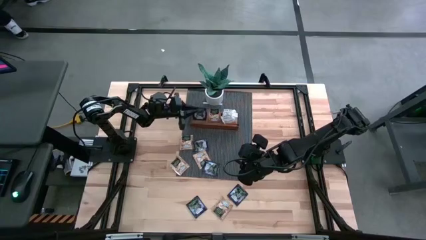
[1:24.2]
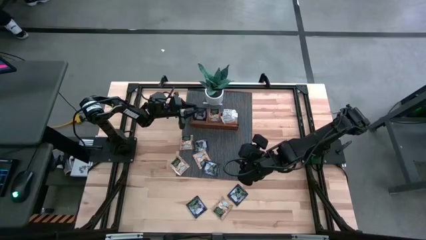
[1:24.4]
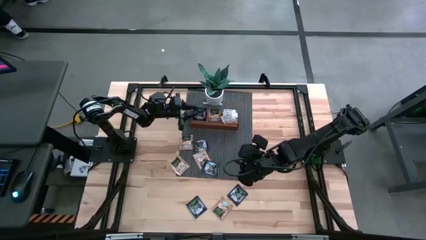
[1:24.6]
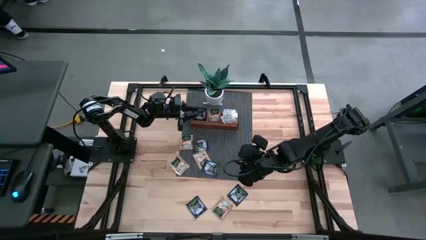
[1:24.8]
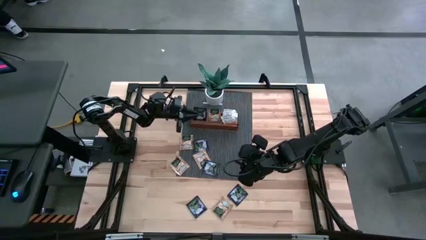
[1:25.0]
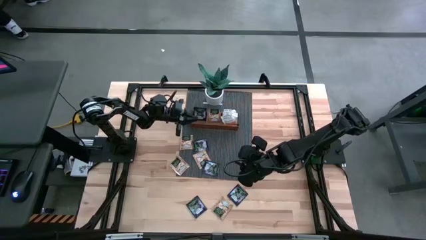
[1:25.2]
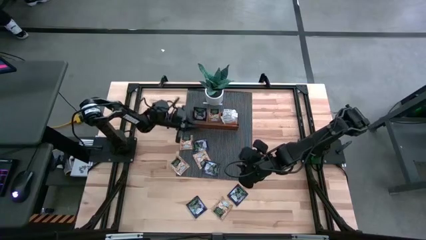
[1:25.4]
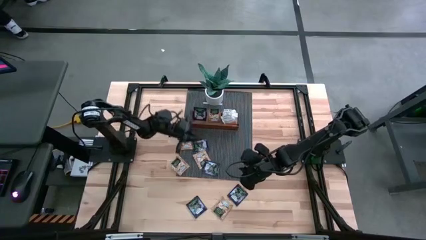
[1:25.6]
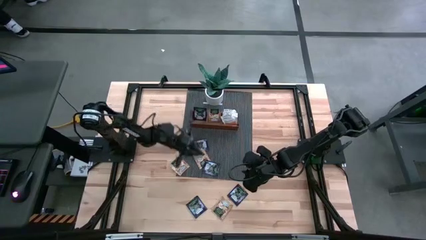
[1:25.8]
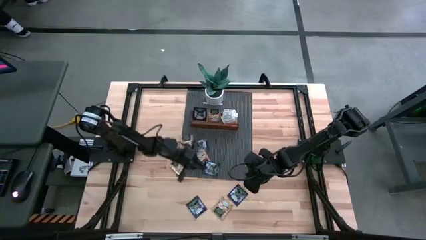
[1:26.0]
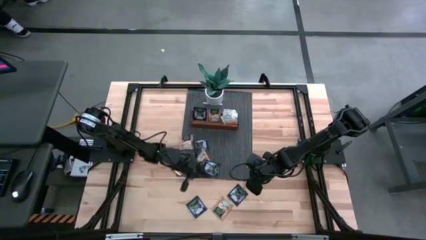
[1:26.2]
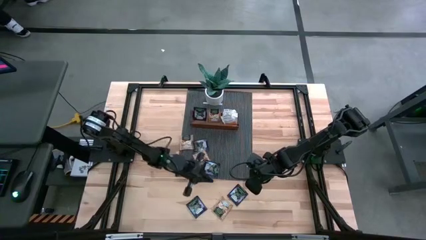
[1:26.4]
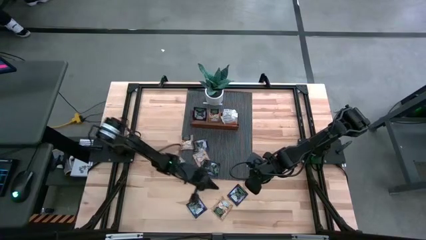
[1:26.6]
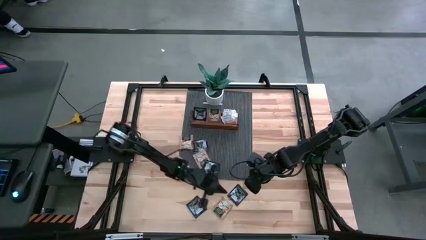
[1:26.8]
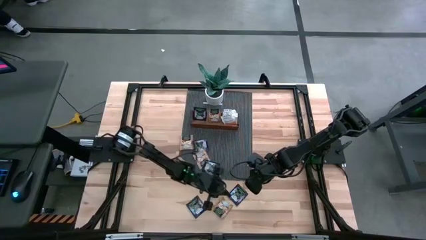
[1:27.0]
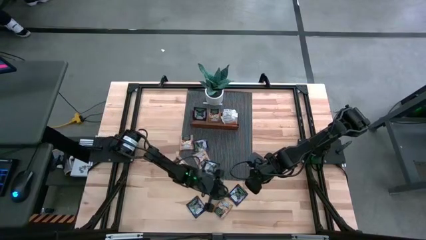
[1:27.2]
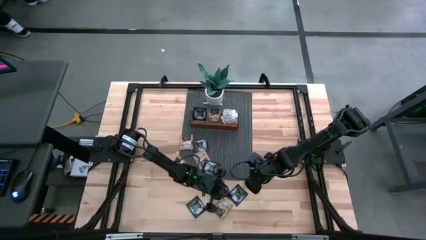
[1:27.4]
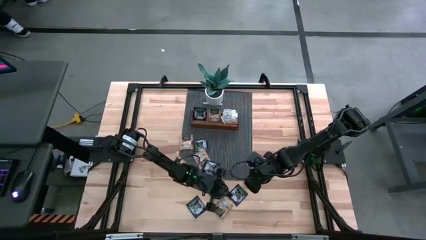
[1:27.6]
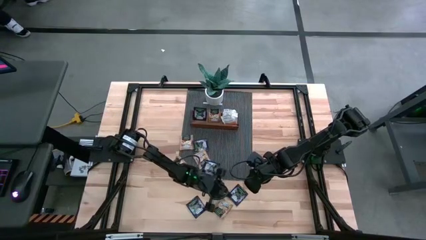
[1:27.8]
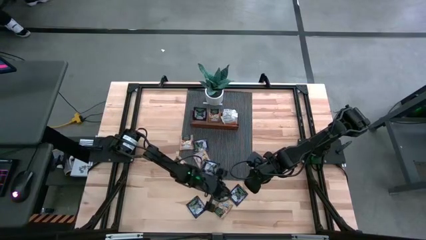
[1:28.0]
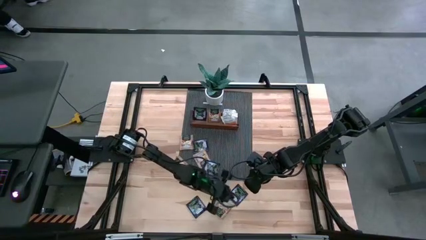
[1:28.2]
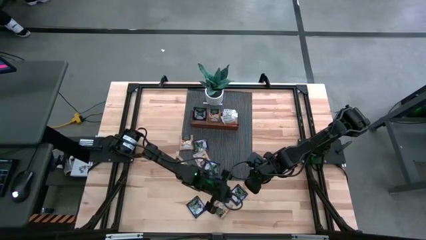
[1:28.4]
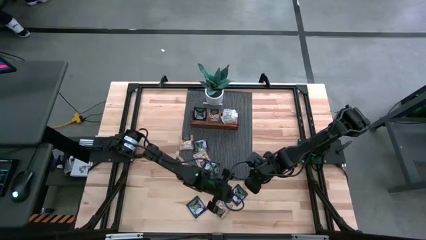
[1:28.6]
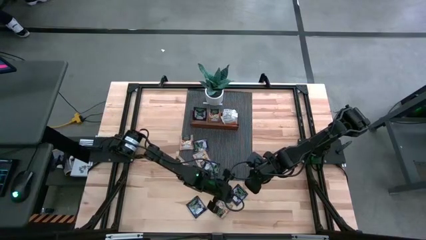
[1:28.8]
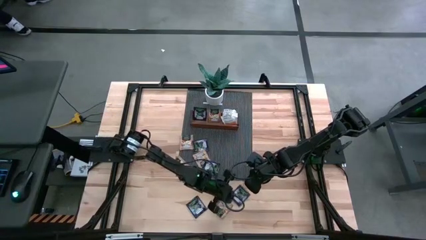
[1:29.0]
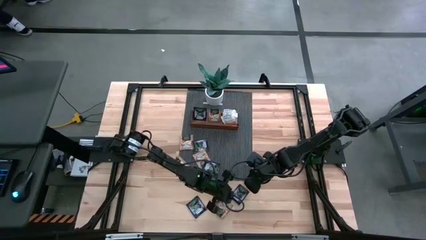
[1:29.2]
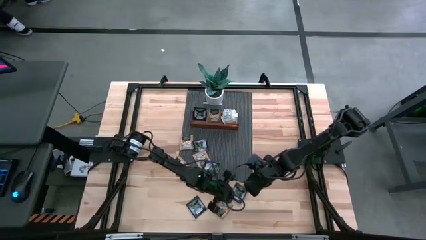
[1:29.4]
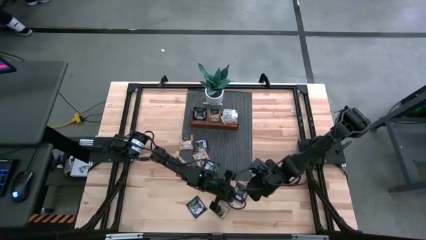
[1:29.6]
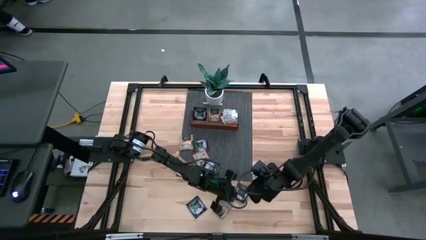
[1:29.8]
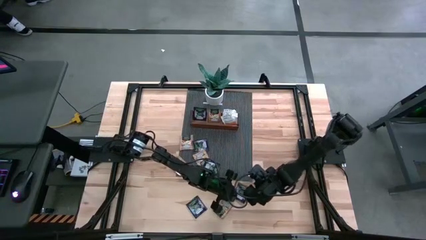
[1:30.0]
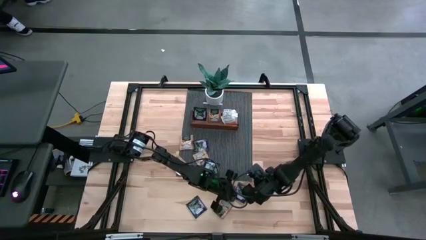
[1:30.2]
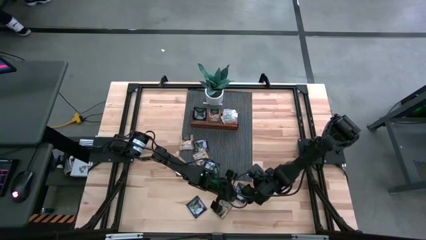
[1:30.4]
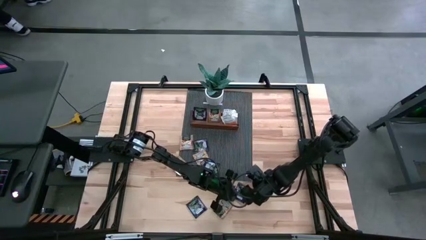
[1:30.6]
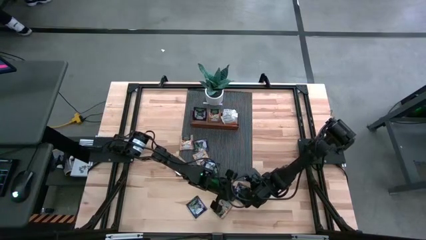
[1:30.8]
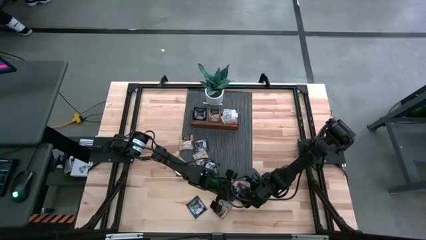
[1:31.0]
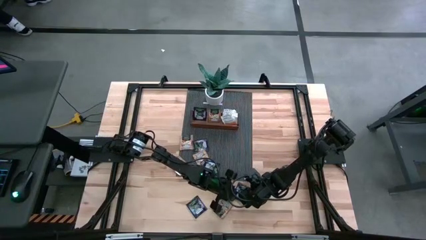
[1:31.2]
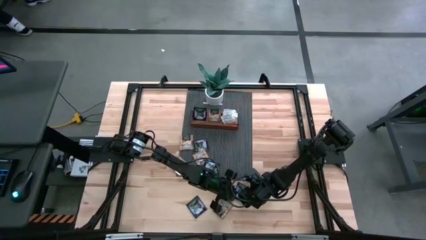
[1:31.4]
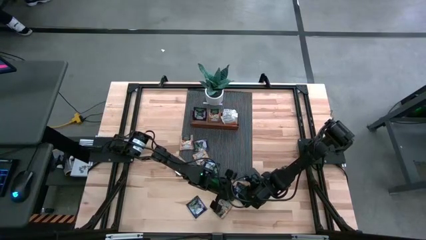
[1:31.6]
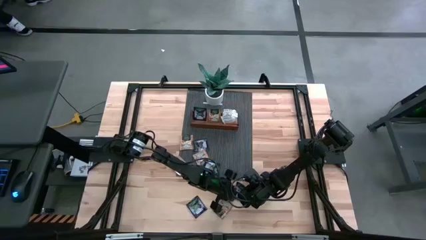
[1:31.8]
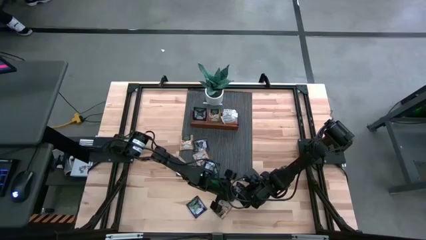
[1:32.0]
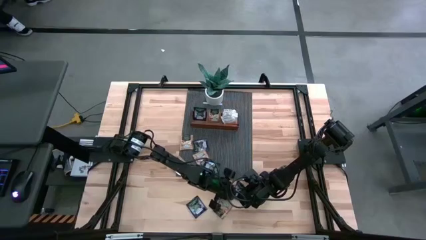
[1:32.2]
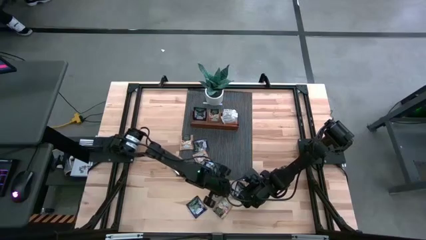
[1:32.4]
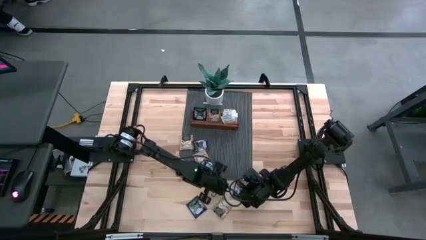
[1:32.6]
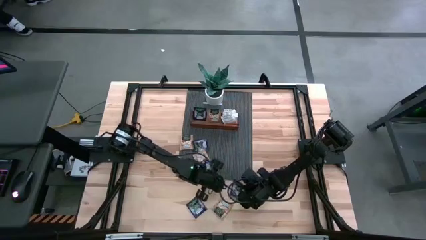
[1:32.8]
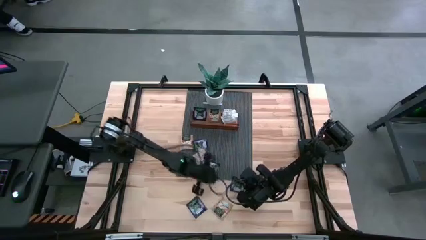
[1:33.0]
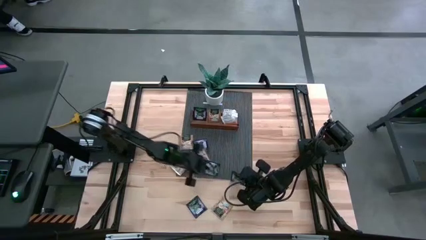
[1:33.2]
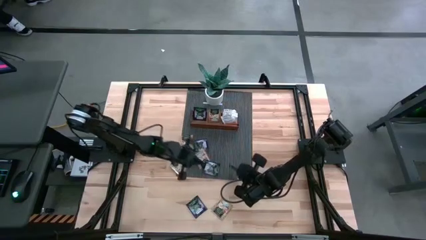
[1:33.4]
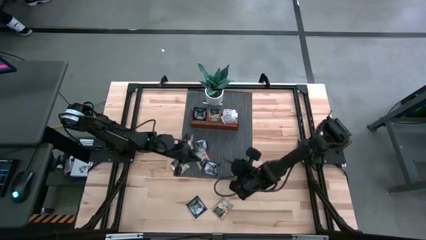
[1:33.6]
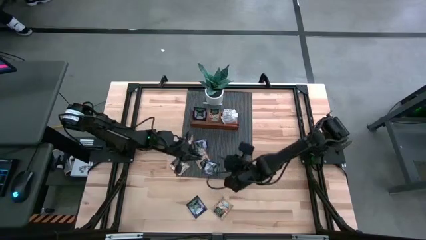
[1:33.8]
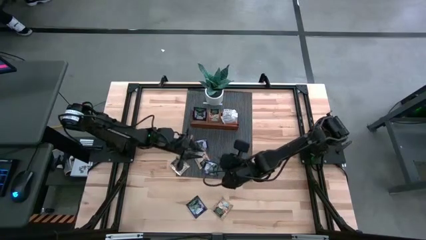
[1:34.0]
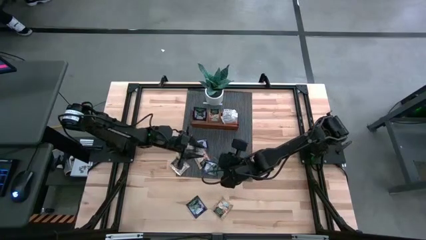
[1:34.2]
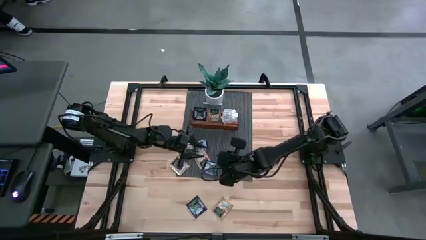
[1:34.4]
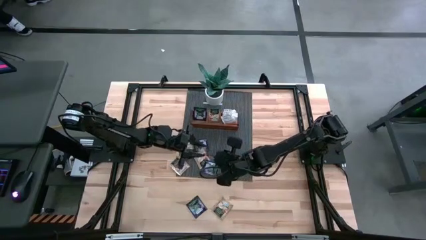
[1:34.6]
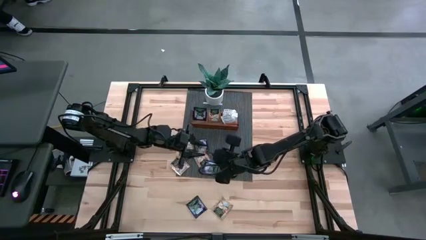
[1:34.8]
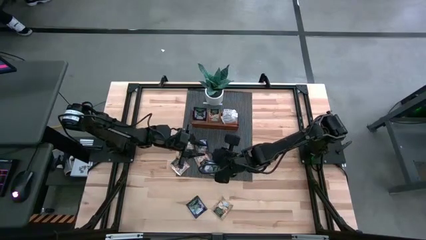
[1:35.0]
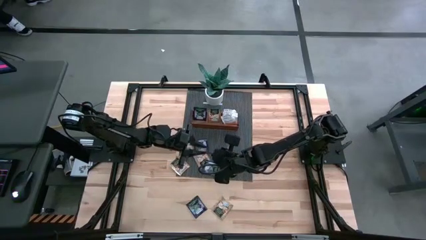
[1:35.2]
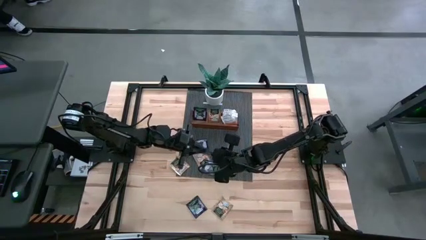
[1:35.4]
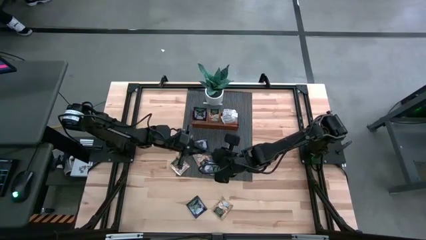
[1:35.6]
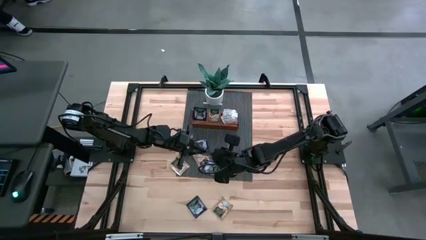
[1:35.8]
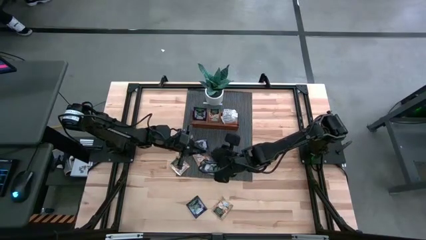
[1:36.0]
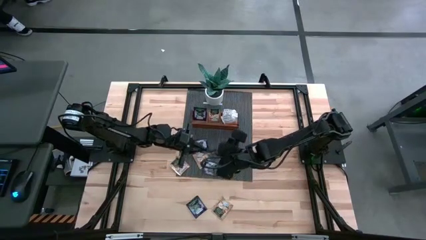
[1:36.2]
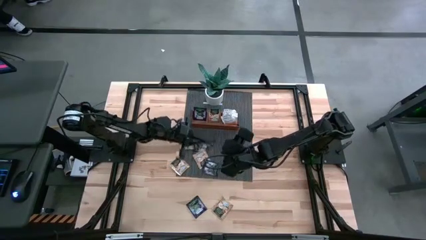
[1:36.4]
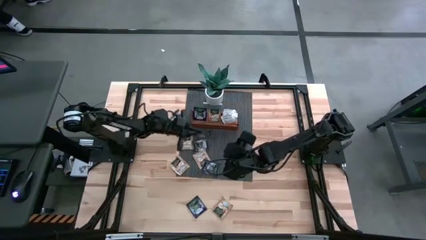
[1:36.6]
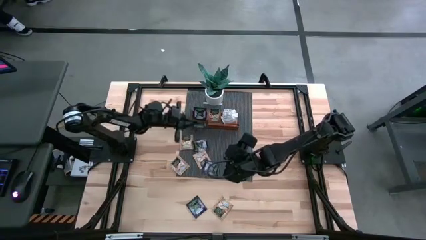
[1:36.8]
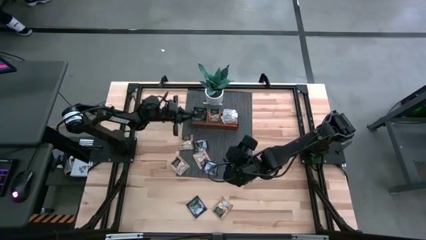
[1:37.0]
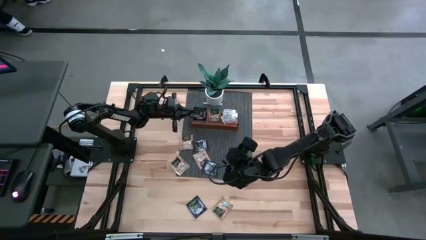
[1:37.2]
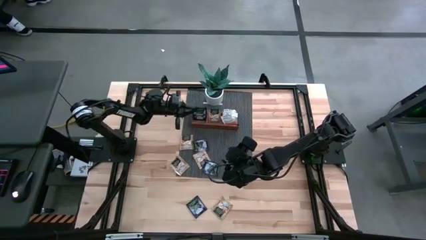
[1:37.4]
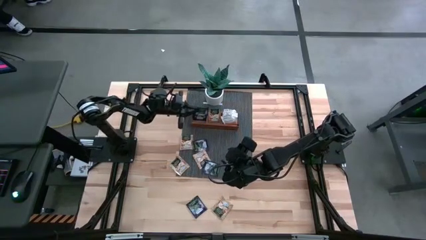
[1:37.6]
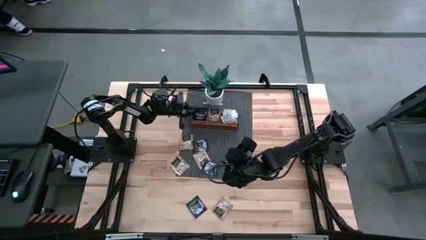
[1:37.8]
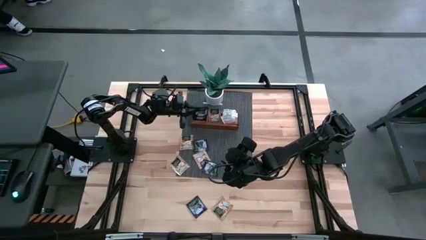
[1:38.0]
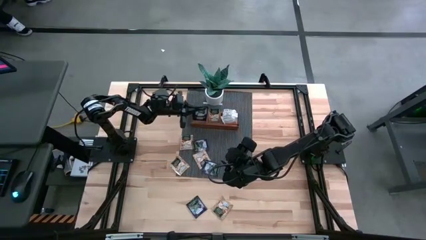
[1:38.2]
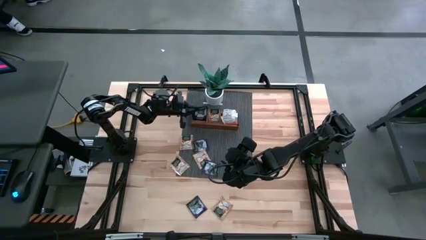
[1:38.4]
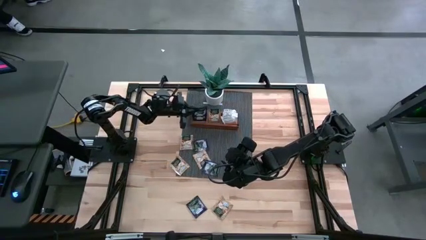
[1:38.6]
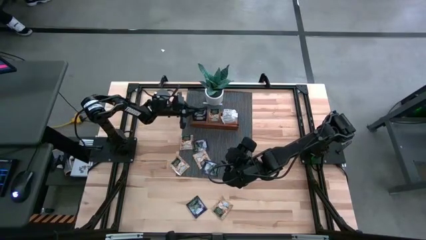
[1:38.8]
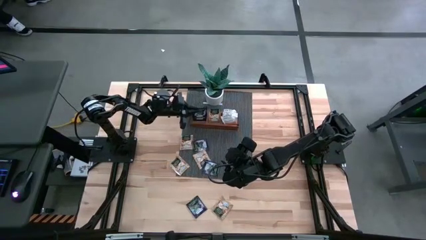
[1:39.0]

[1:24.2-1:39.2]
Task: Pick & Place Tea
Put the purple tea bag into the left section of the wooden organizer
